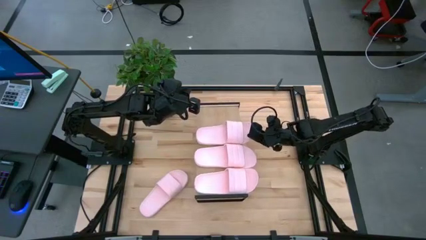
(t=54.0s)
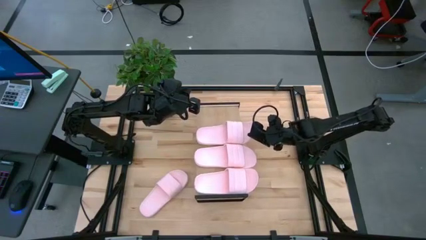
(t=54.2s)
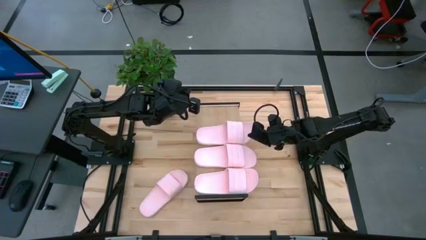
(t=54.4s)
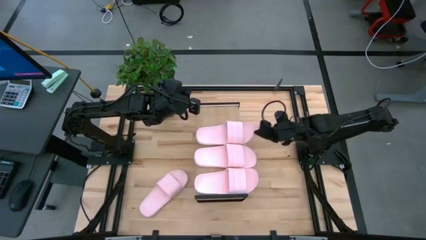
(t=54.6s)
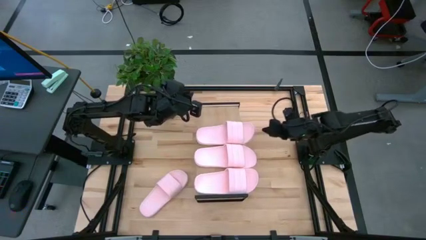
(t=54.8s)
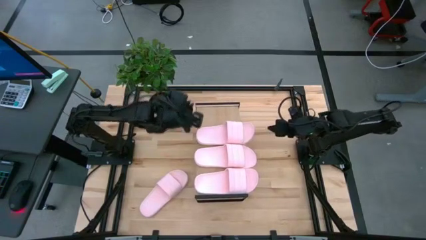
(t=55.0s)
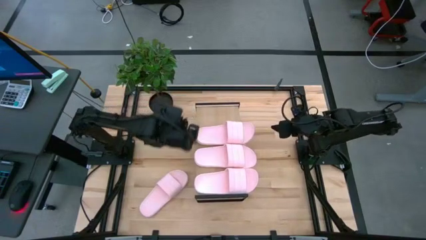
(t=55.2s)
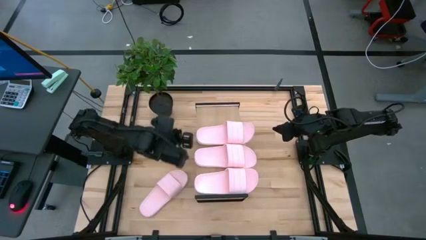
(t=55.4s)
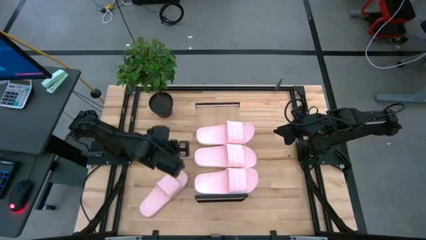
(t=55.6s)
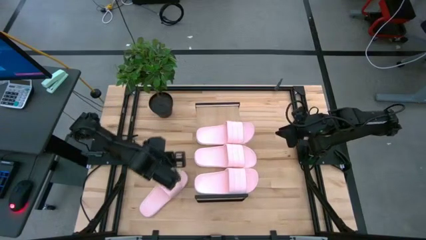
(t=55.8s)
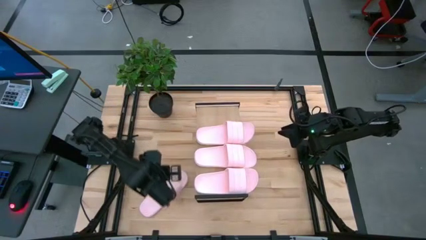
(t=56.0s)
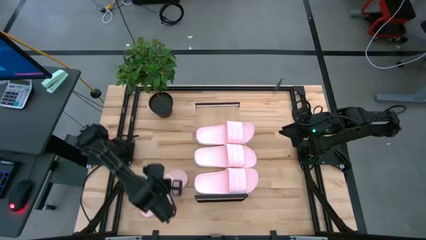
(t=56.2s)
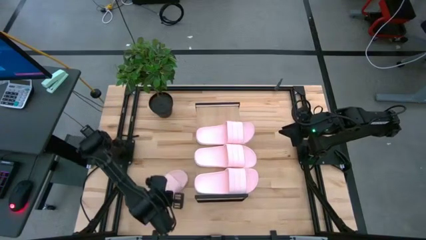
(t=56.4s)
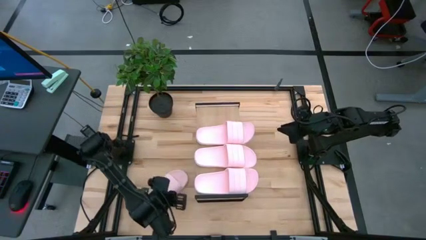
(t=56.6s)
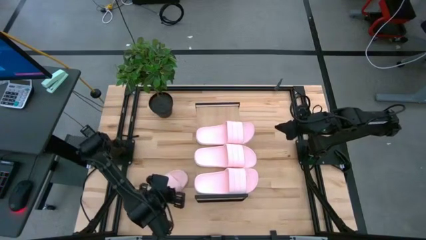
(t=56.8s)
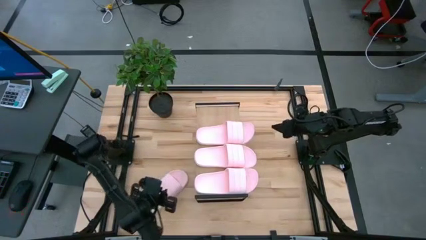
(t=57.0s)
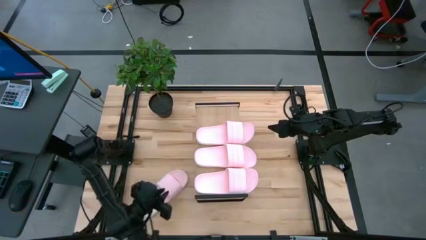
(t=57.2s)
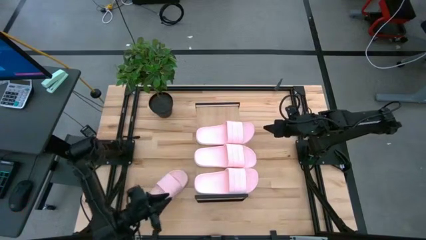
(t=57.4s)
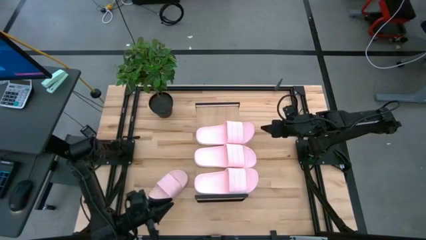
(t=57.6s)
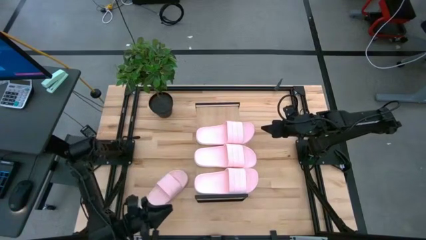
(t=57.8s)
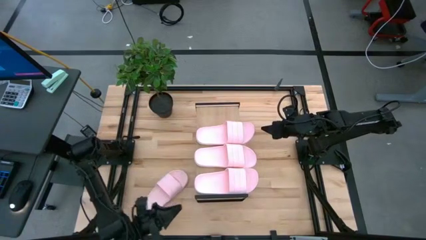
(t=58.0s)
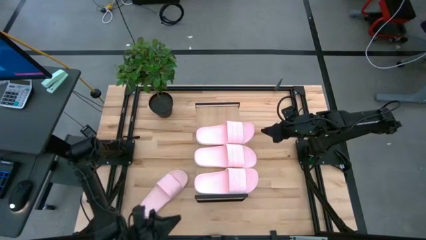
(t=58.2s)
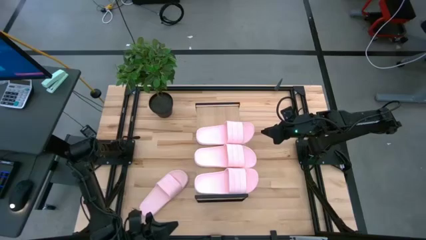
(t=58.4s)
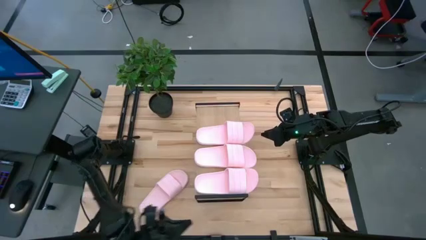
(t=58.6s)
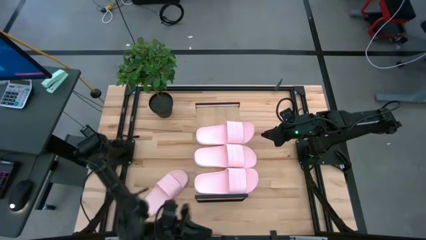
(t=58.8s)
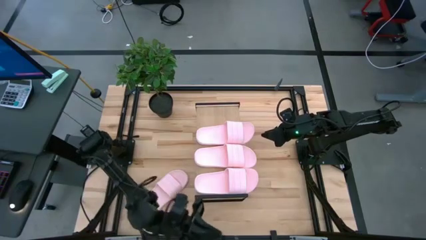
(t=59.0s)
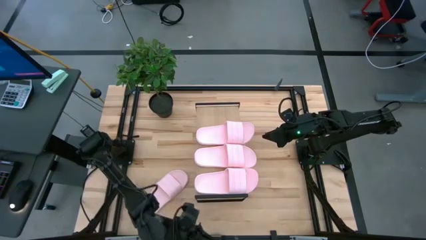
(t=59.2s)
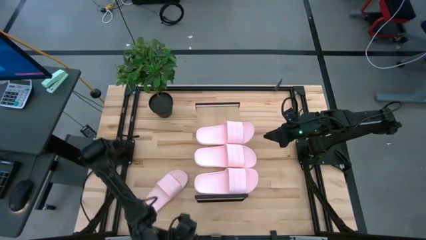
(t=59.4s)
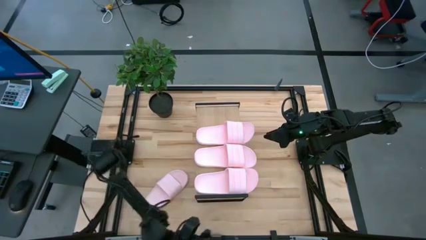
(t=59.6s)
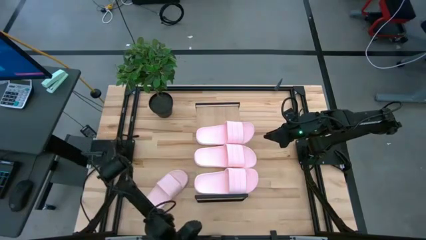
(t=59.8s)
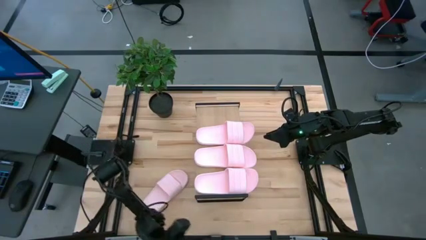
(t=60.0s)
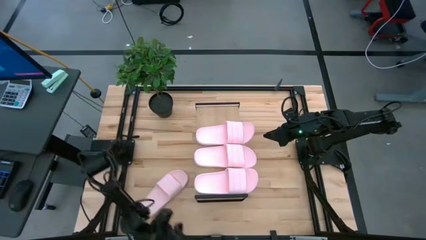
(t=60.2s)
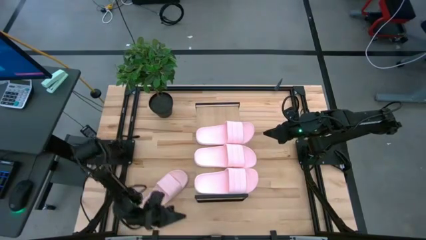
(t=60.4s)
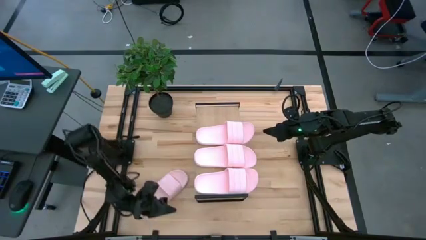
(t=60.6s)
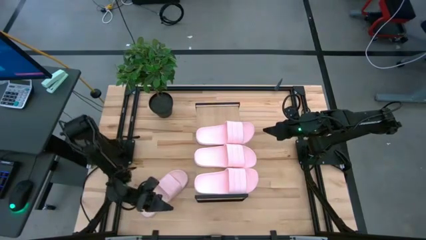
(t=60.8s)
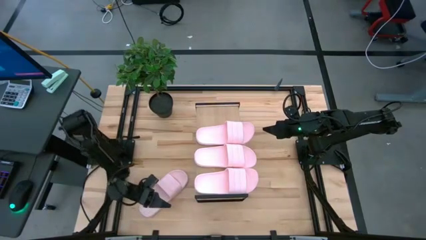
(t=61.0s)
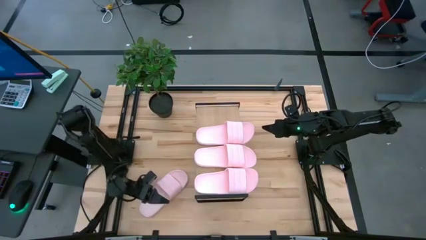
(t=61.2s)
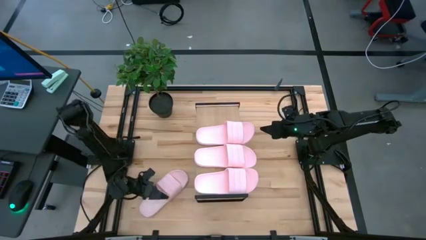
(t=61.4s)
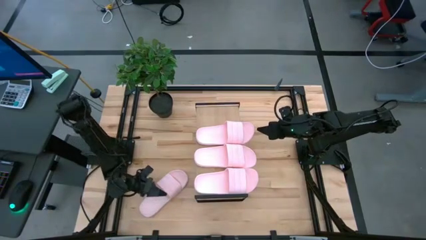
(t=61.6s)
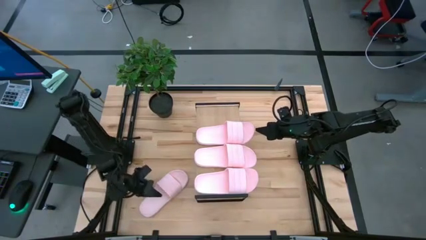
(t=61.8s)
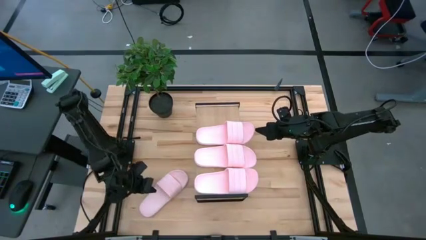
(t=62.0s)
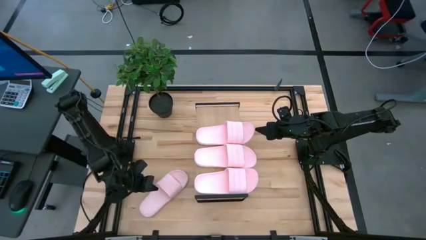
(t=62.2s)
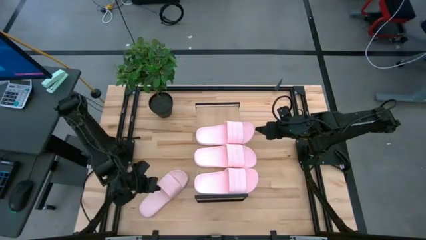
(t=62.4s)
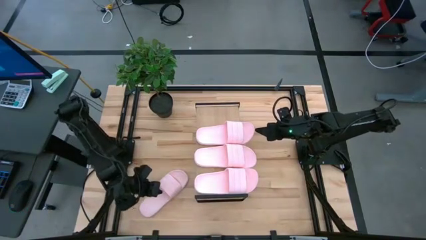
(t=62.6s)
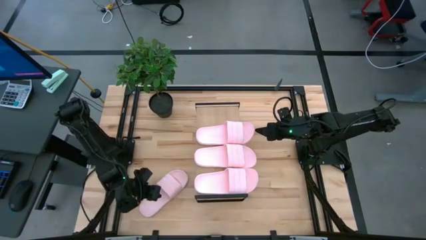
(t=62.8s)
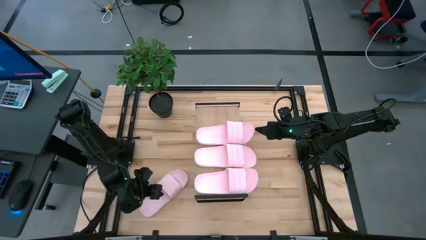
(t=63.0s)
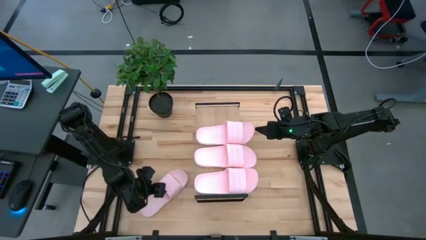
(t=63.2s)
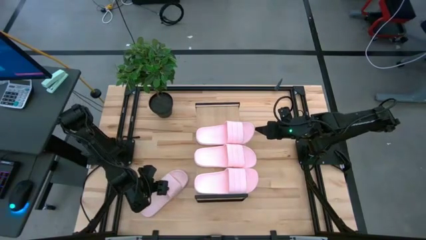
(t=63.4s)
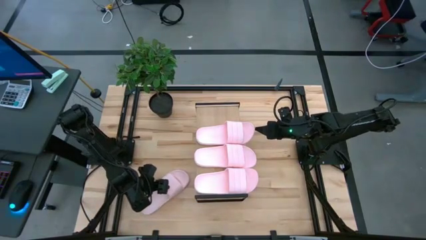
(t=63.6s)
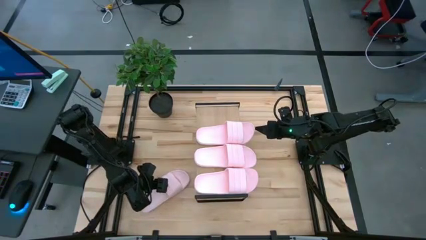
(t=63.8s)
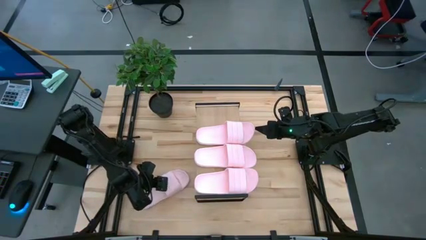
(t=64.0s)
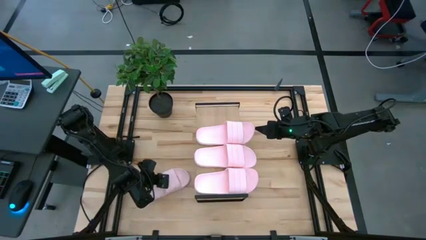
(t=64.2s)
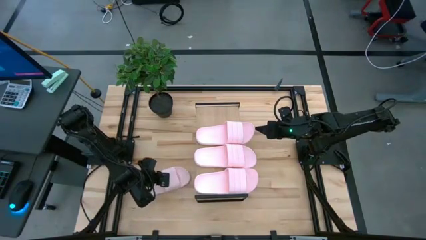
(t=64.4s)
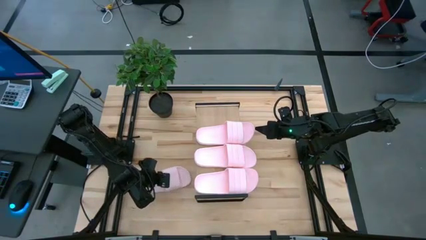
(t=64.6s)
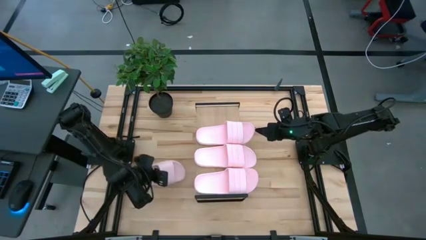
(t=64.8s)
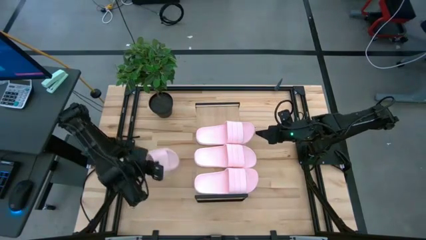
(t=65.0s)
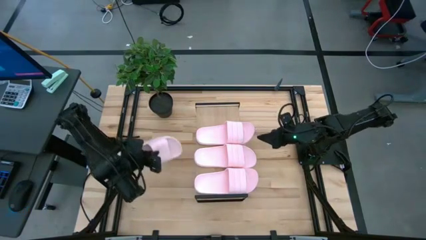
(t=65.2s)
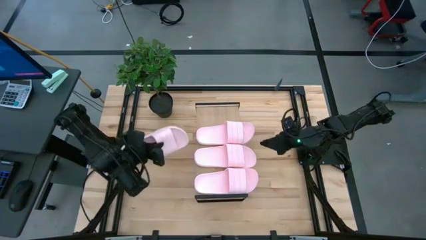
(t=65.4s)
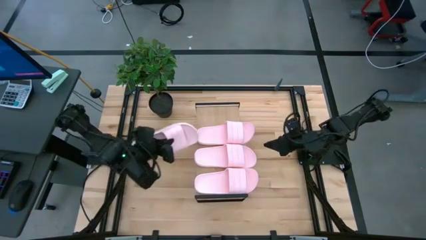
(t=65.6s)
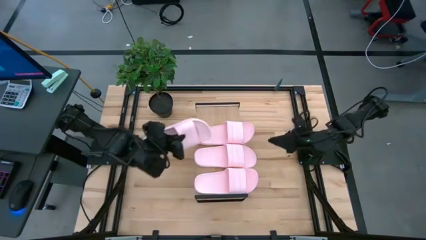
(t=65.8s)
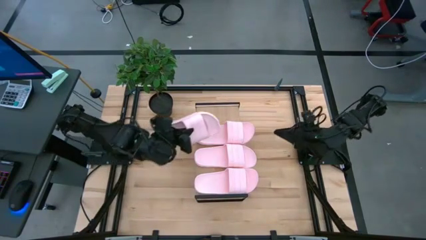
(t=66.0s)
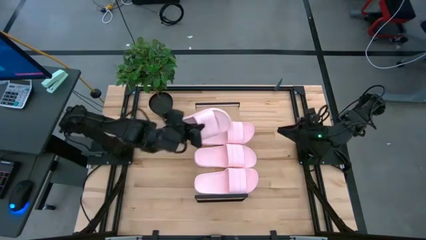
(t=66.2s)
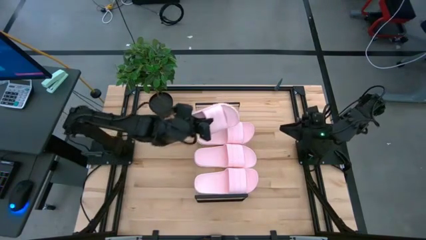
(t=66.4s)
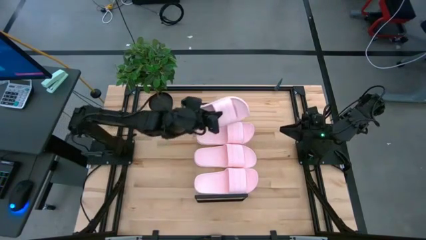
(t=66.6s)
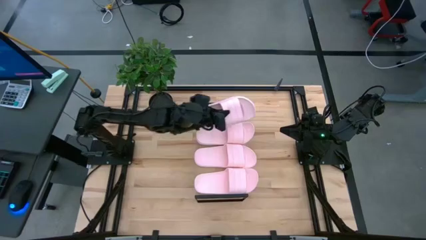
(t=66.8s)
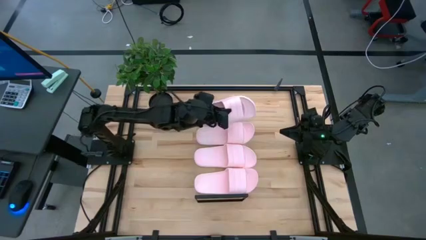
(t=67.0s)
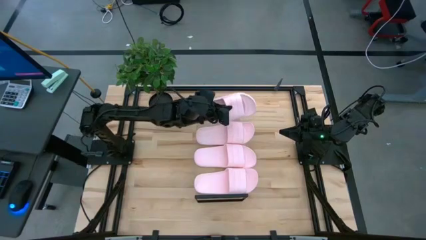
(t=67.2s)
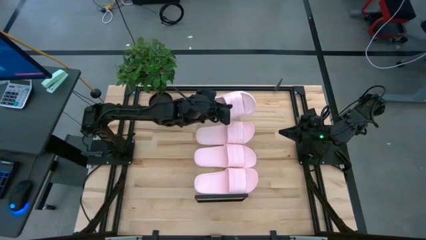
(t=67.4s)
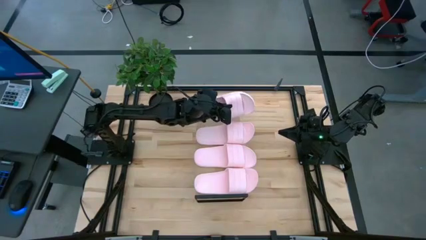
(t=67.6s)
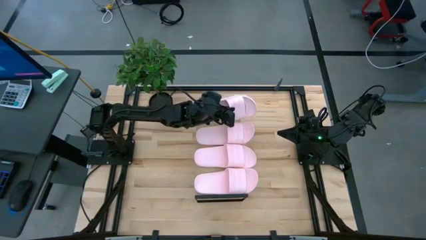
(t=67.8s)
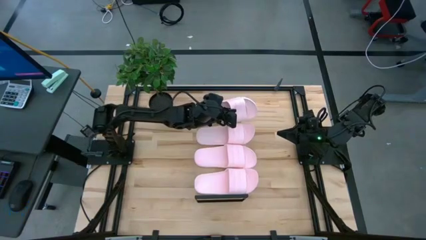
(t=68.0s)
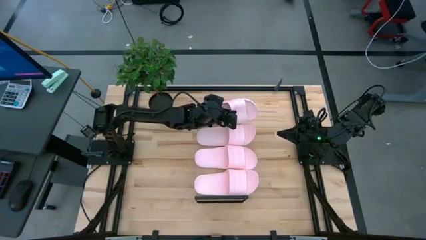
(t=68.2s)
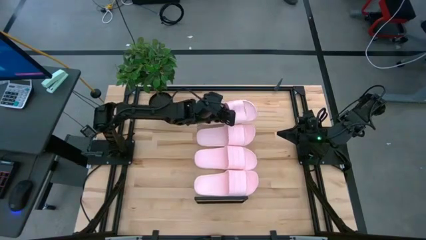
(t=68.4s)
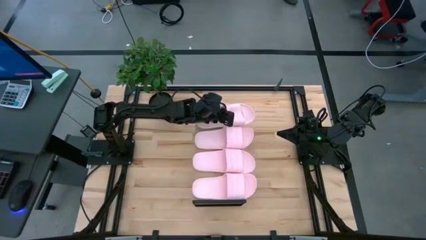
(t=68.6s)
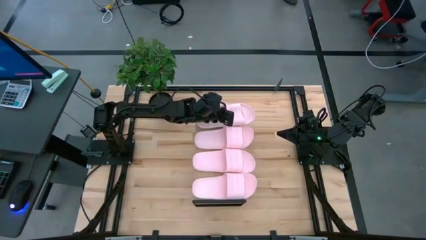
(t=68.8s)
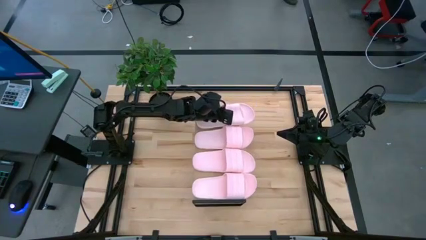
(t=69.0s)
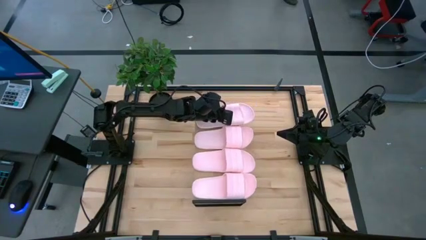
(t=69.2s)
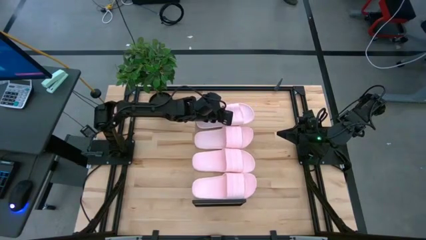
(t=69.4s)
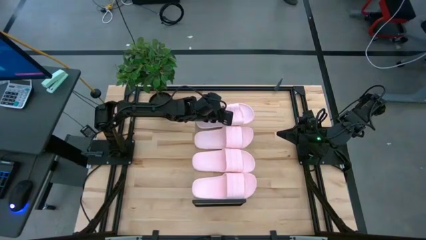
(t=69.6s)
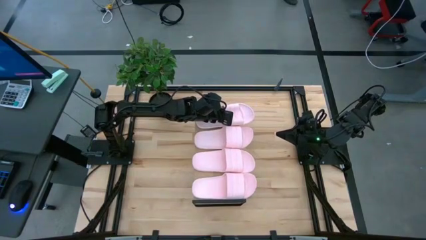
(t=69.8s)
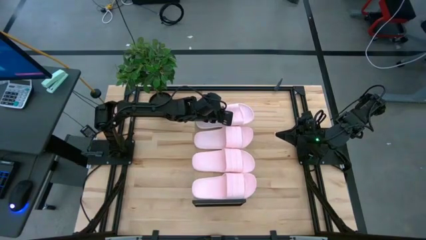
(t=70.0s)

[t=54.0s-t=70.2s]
Task: Pick and place slides into the shelf
Put the pink slipper on the shelf

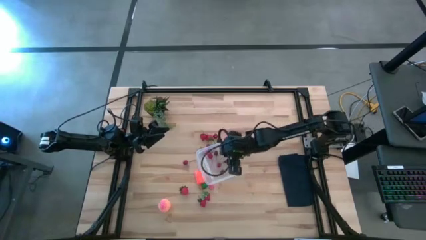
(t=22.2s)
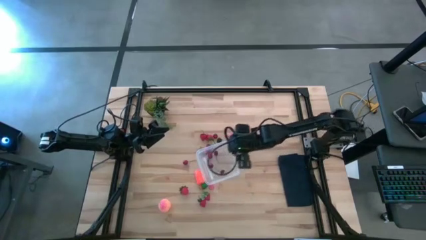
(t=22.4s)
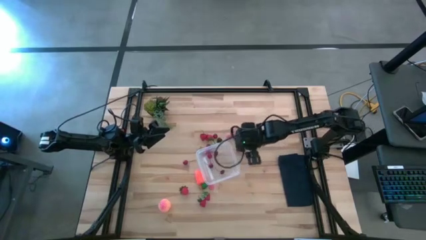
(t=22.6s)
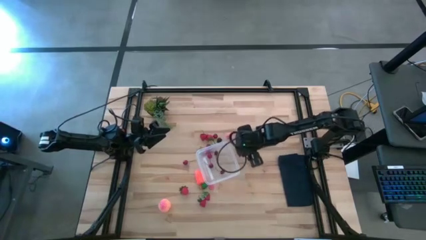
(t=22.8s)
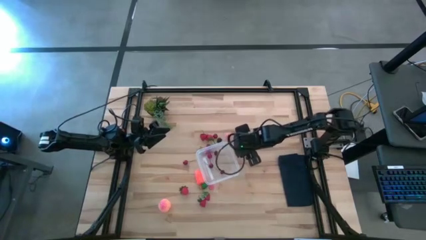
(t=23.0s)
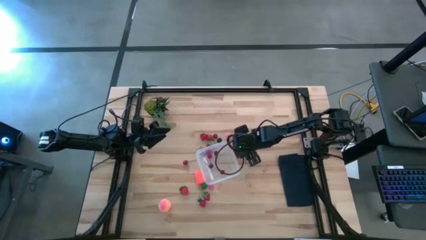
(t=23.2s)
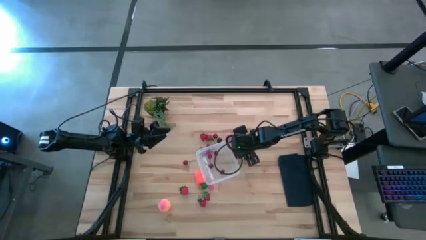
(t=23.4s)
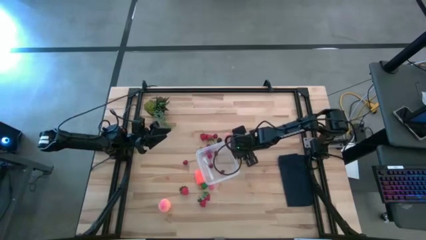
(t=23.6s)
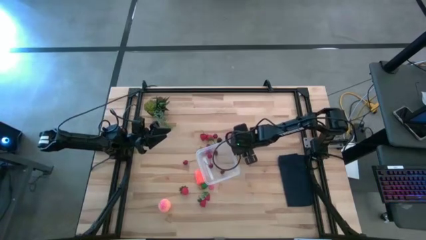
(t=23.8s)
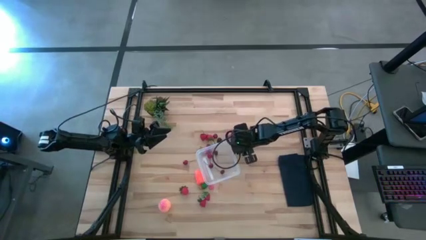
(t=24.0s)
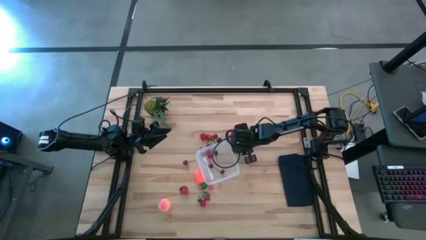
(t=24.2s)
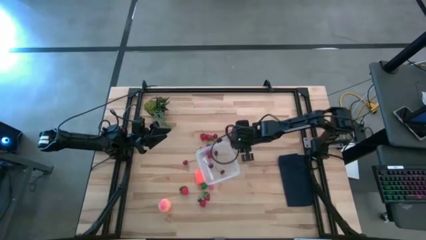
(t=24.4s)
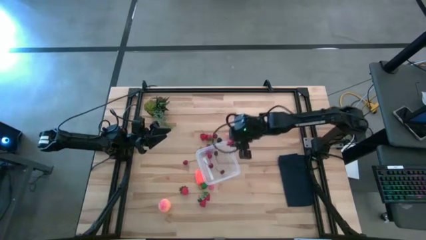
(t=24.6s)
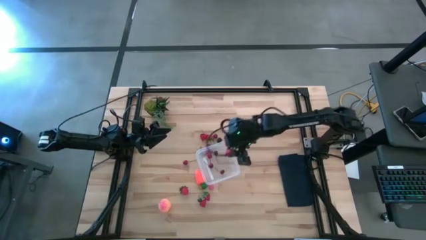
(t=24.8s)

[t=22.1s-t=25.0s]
Task: Pick and placing Produce into tupperware
Put the strawberry into the transparent container
